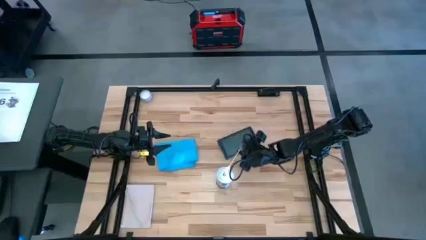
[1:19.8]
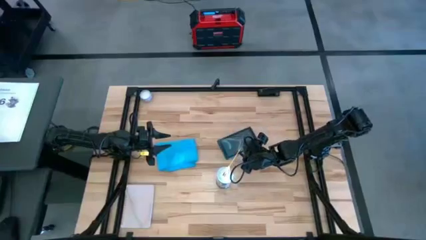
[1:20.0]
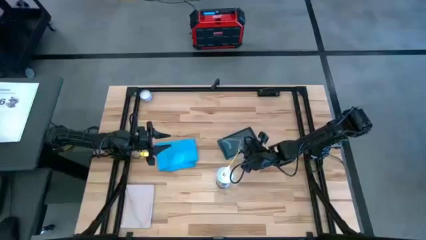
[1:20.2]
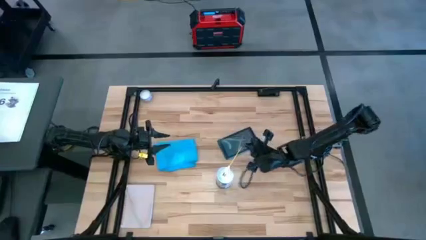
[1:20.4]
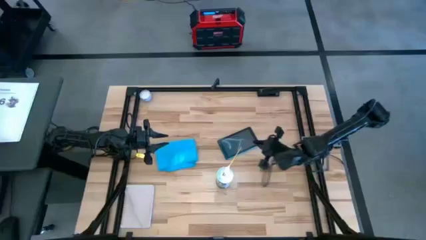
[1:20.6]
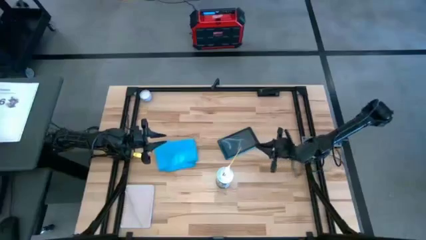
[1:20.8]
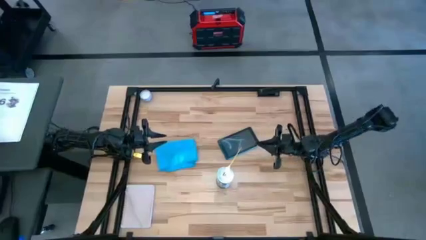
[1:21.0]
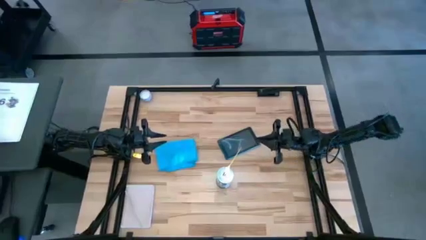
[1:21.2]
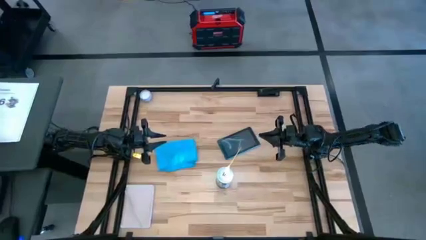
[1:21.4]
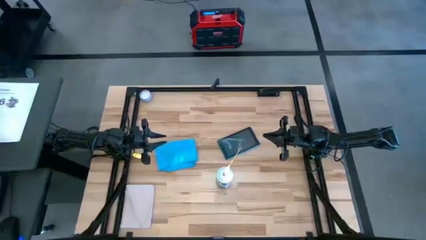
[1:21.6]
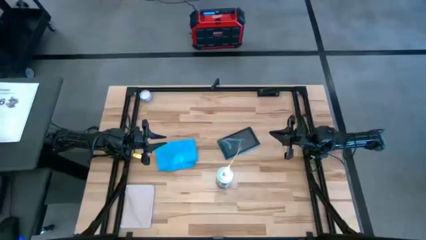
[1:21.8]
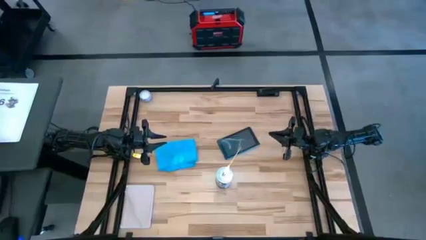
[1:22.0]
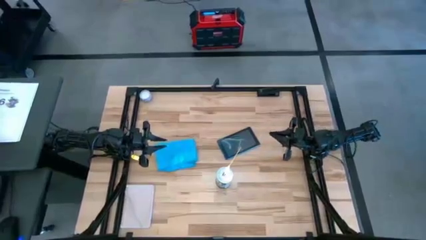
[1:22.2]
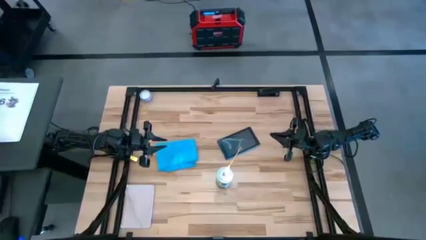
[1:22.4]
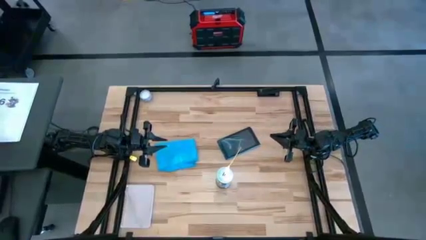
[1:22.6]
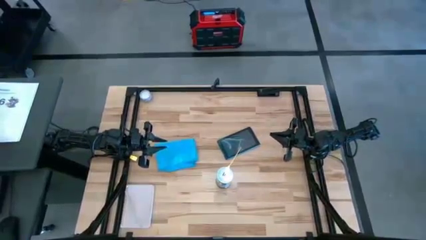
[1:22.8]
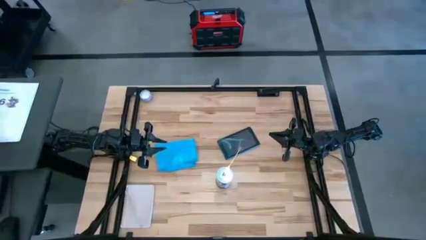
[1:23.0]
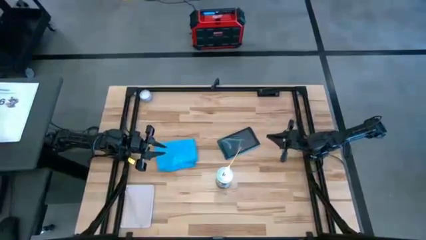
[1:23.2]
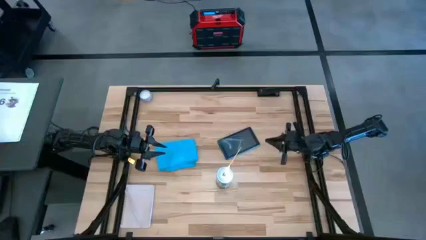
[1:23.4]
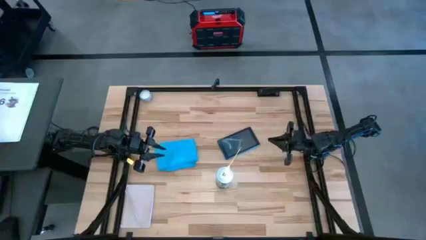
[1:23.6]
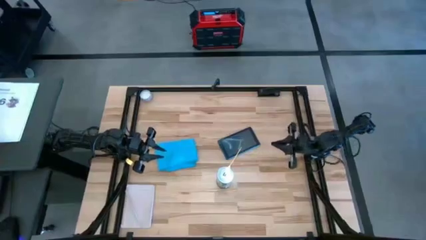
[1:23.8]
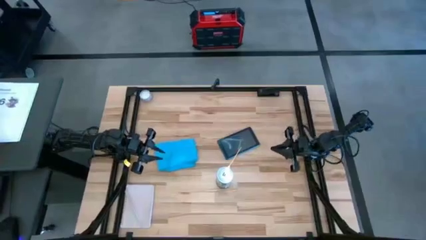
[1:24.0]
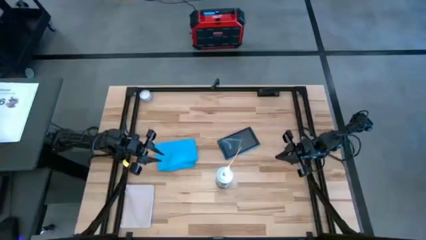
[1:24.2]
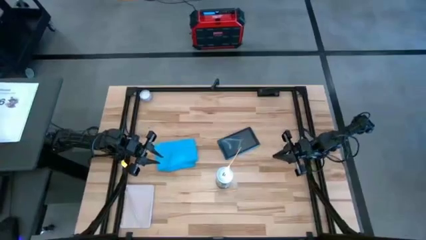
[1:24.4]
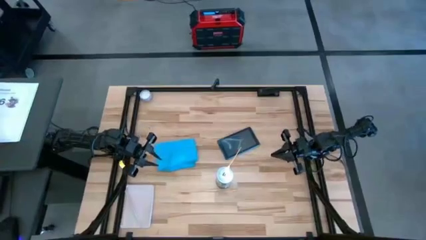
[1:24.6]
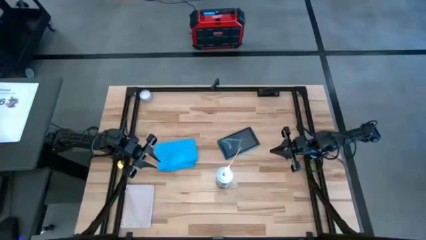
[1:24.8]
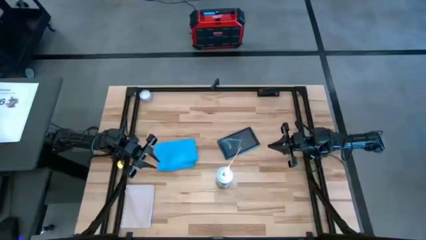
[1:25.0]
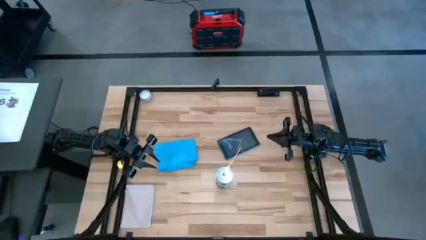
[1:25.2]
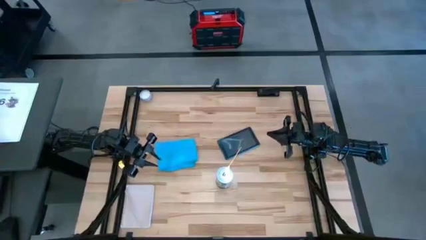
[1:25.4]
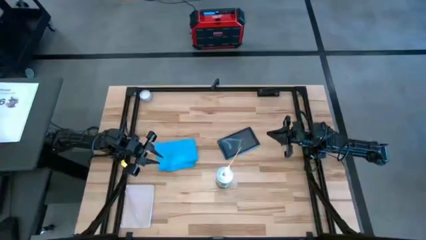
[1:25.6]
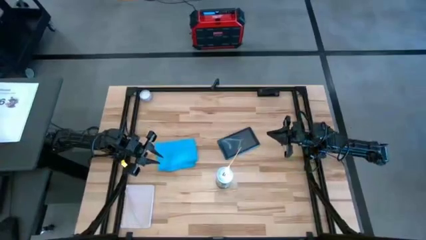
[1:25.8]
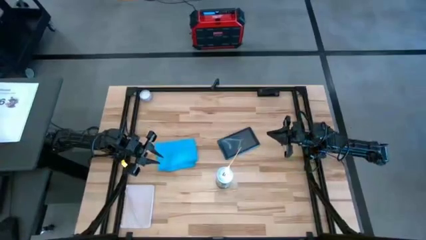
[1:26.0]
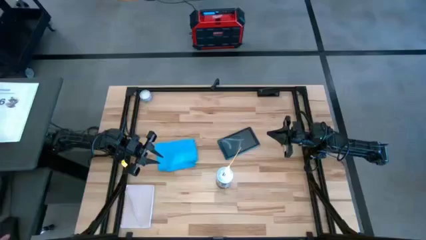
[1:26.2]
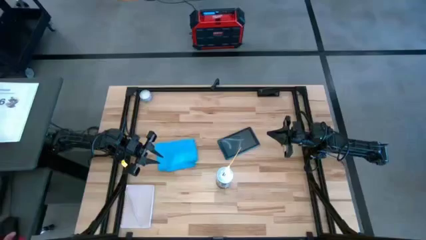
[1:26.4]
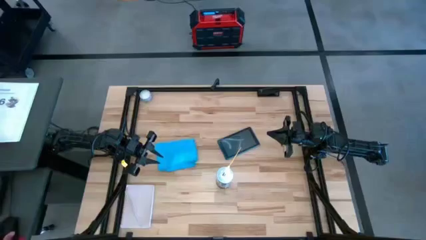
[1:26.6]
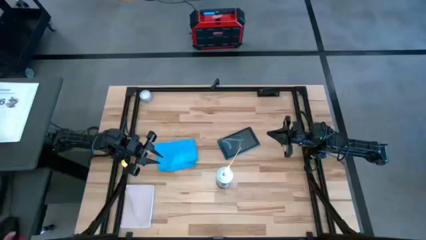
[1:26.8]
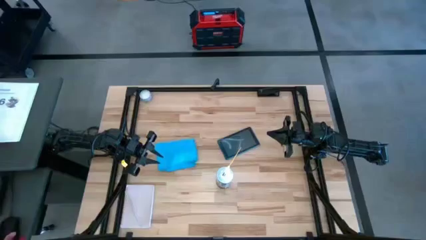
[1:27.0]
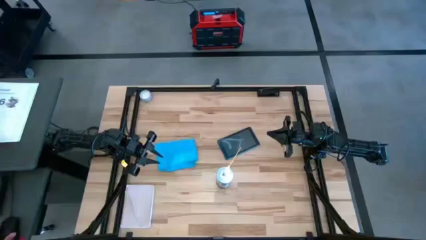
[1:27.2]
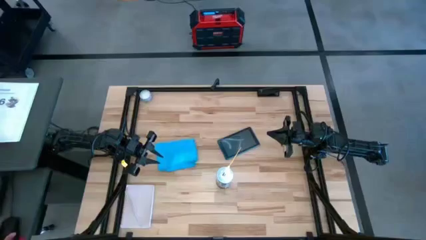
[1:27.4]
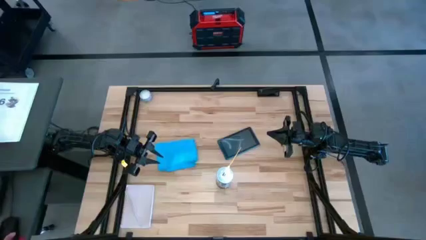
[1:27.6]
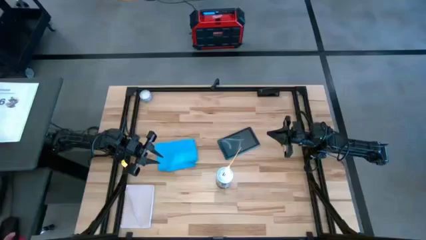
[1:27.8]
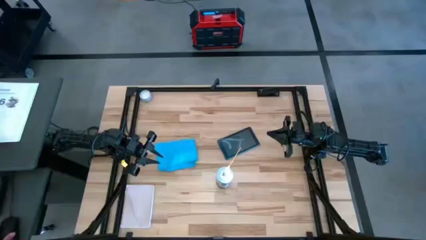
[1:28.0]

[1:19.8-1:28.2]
Task: Apply microfiber cloth
Return to Home Position

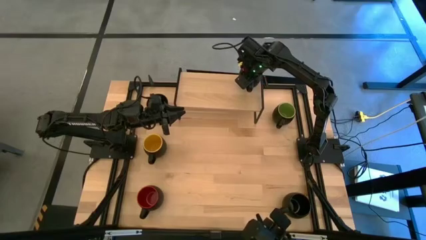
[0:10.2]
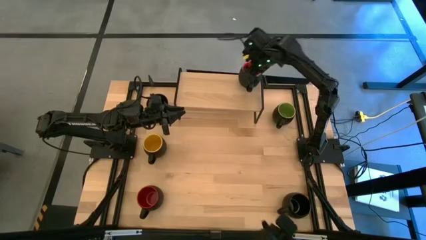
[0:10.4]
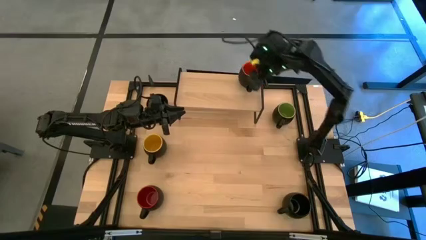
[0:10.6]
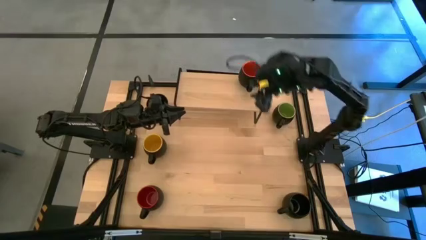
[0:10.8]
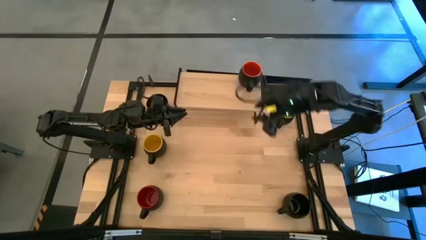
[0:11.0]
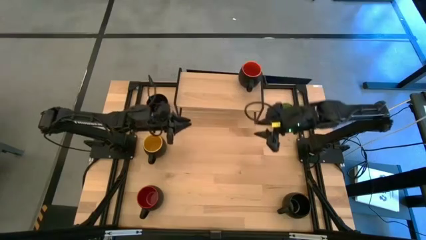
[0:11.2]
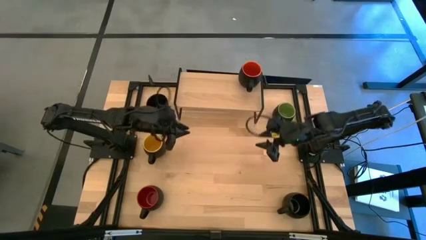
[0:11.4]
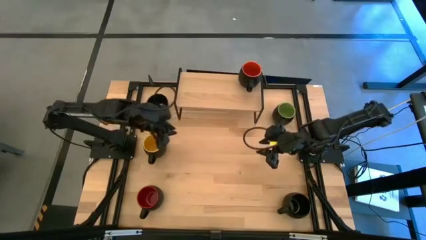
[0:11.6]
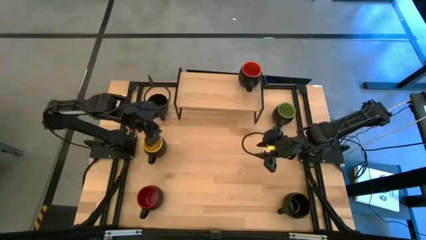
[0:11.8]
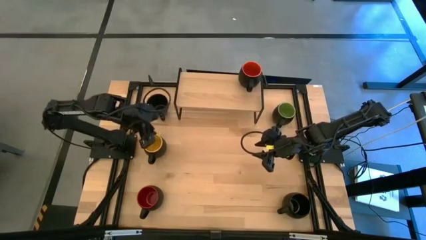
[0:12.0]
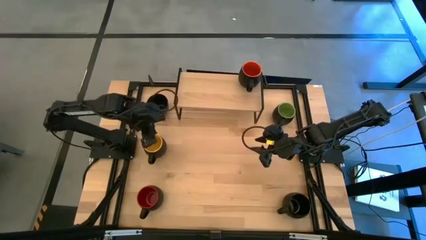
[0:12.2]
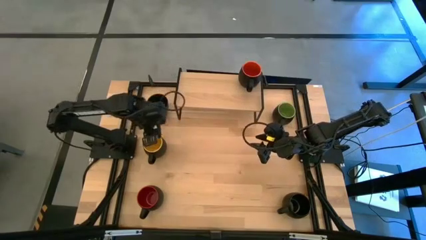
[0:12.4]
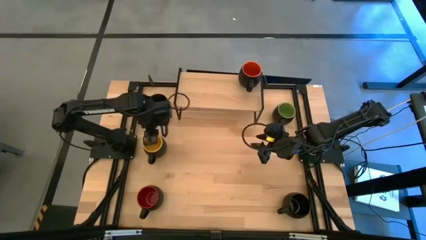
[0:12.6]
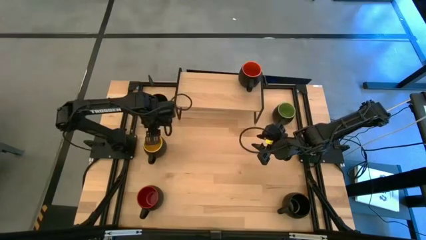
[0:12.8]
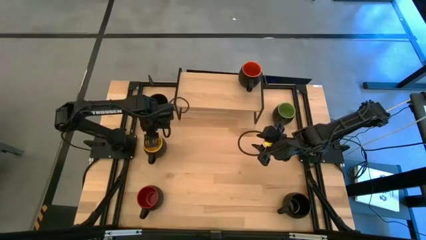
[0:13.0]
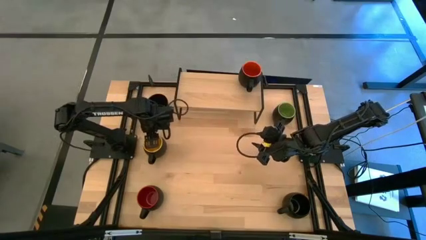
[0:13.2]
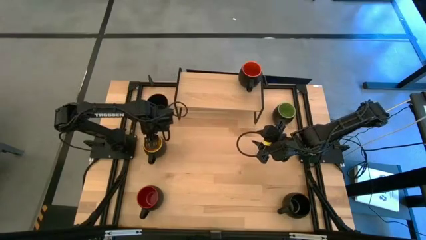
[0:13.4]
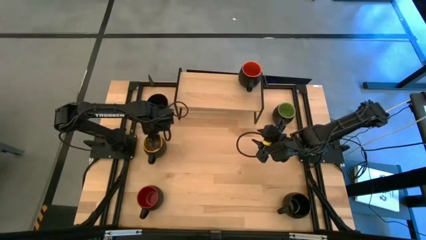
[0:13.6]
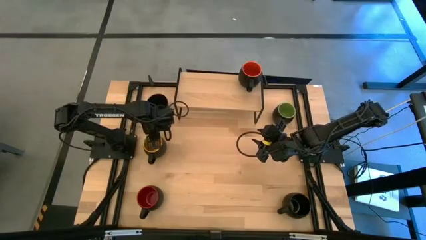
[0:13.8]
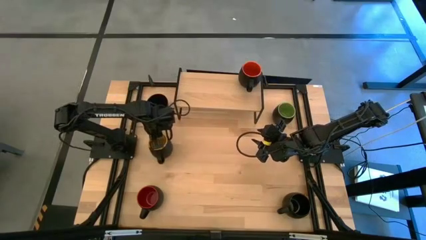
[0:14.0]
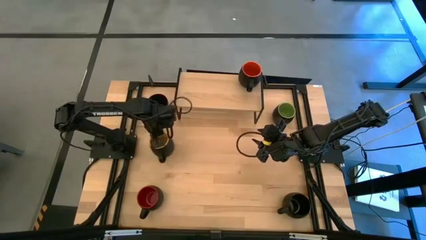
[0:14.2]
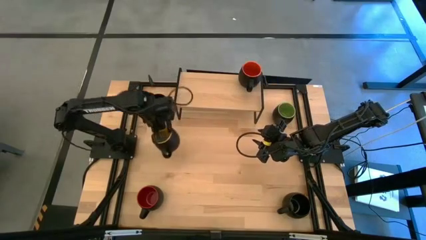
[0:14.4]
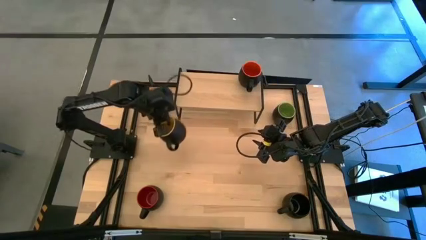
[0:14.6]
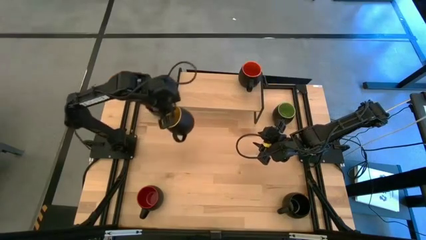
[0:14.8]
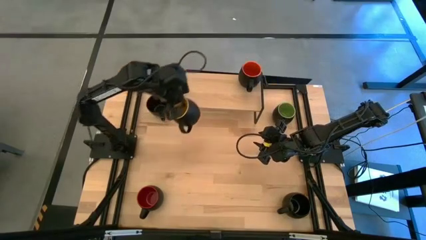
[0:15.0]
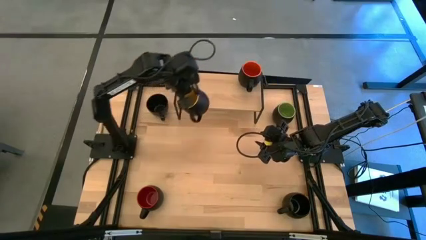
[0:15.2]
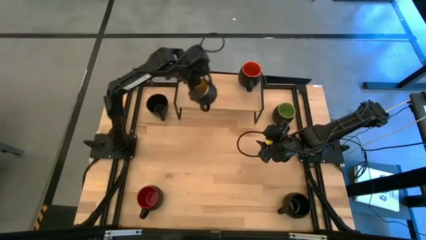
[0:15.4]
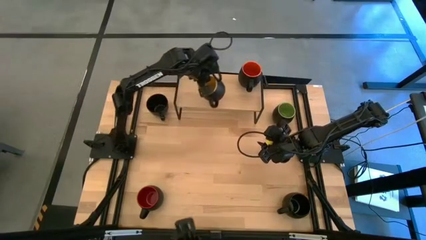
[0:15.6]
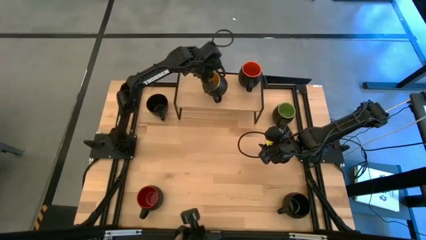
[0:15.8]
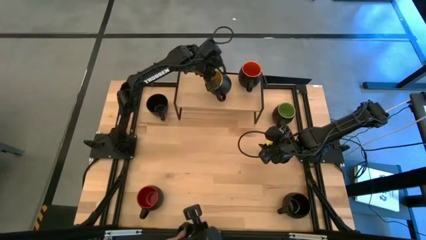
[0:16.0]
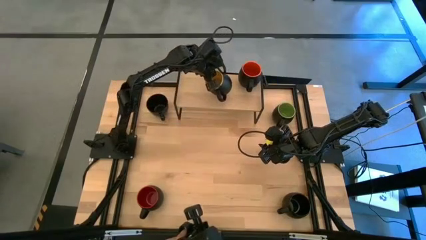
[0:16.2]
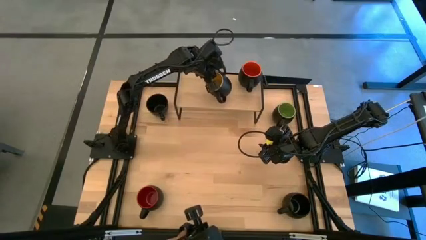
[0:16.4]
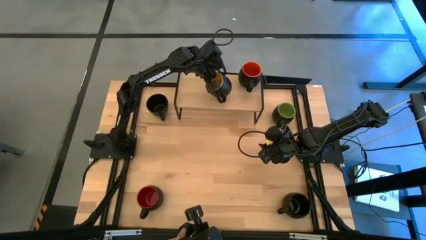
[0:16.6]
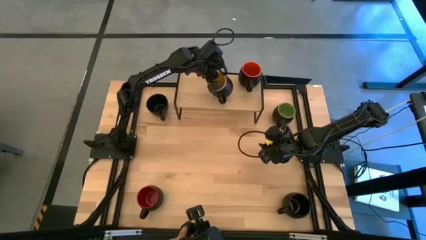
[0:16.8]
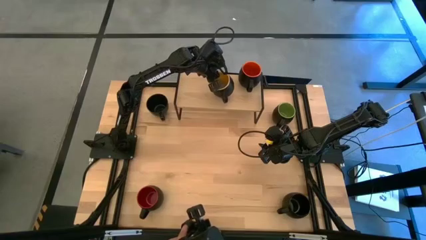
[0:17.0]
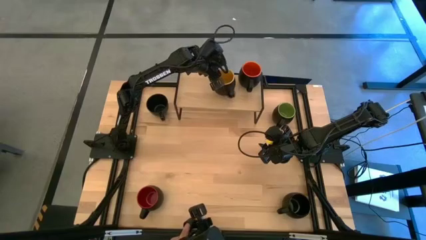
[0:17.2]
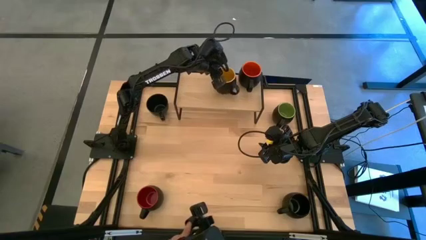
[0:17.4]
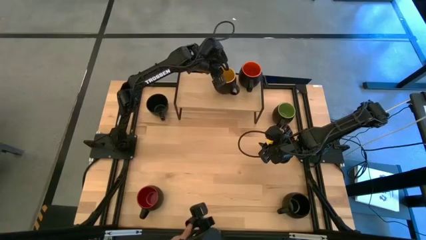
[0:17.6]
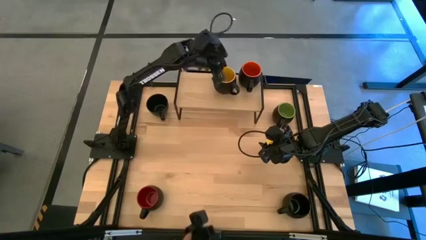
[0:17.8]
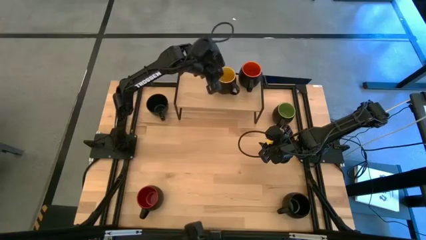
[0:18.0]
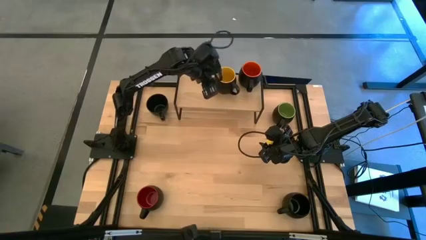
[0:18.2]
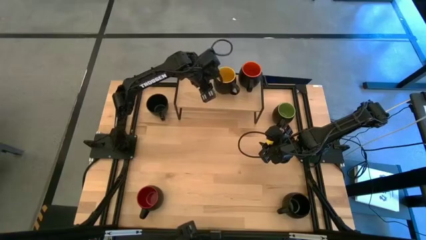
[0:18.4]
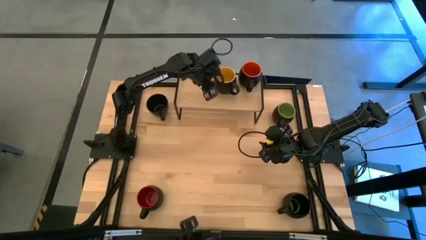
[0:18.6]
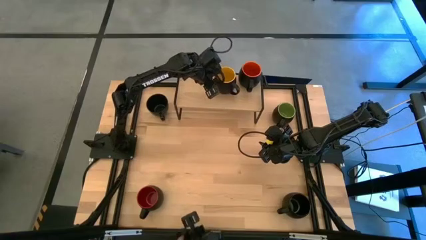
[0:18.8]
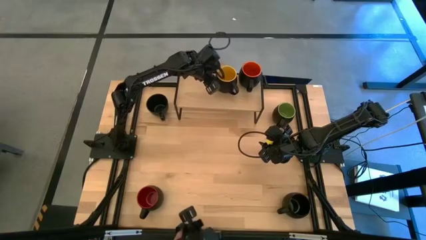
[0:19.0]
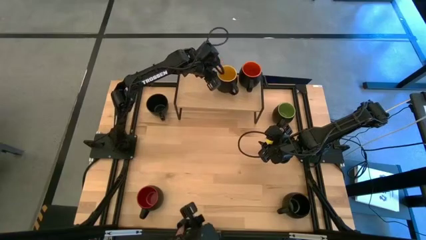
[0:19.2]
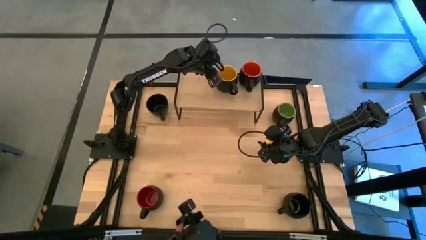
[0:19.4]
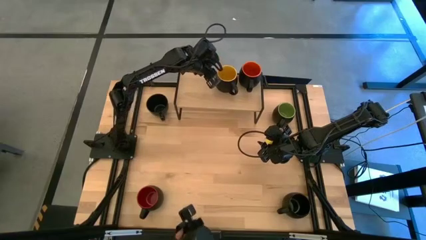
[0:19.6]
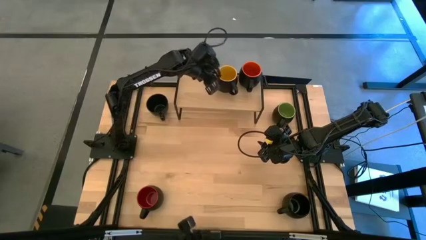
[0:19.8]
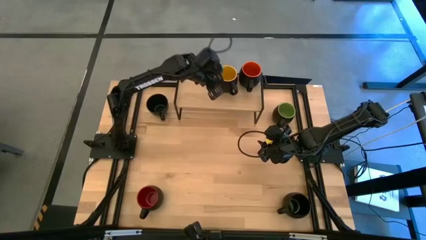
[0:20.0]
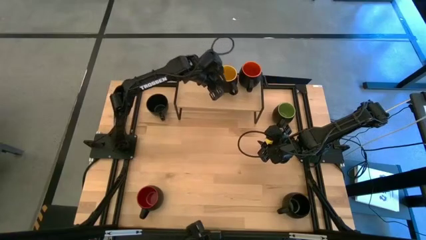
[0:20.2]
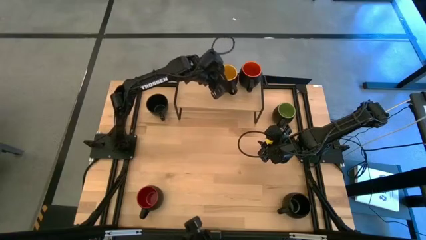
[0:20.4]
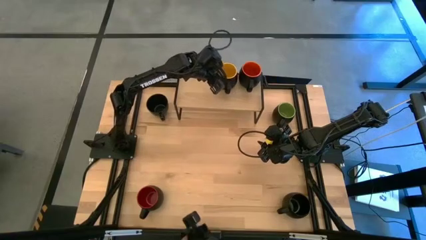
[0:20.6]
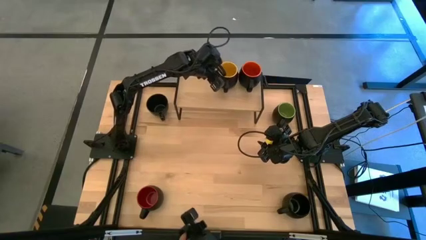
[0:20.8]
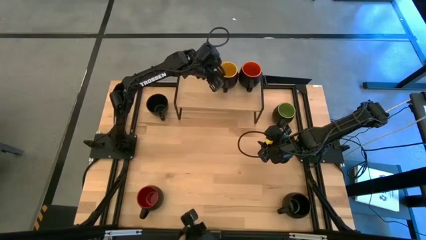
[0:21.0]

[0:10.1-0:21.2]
Task: Place coffee mugs
Put the yellow cup on the shelf
